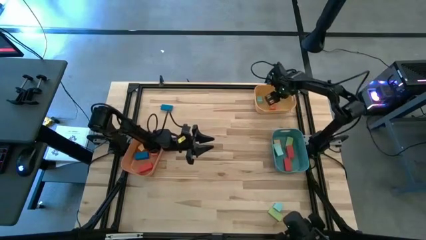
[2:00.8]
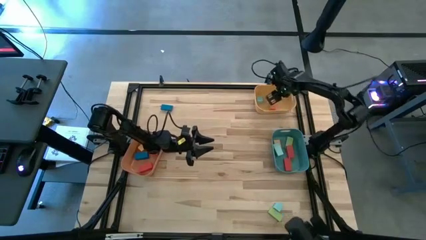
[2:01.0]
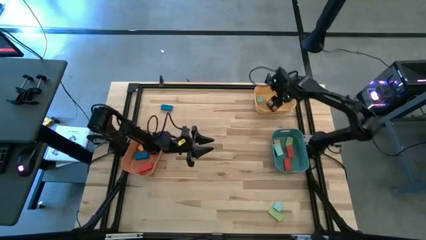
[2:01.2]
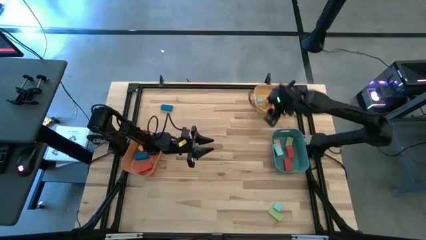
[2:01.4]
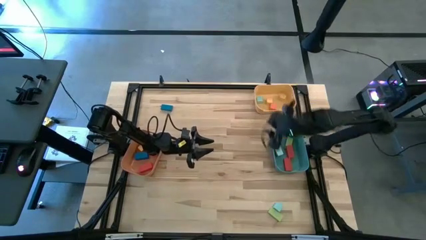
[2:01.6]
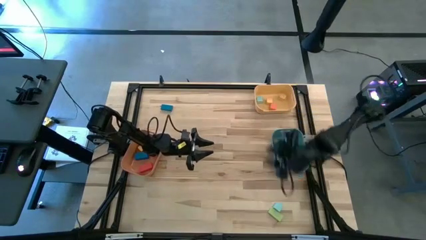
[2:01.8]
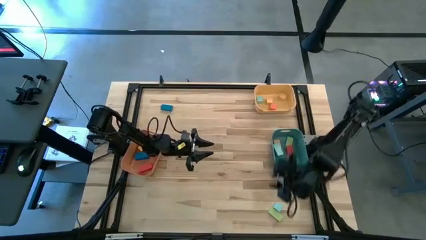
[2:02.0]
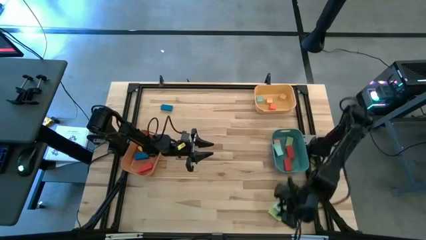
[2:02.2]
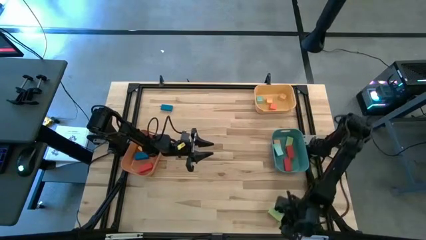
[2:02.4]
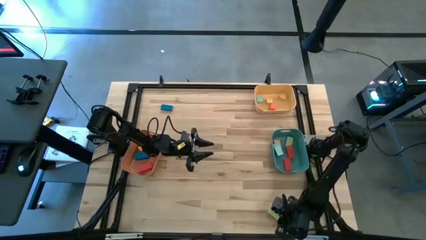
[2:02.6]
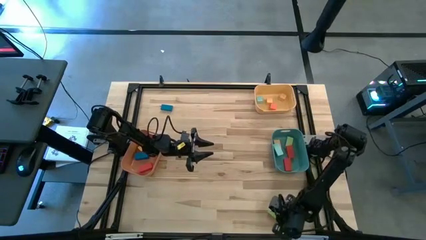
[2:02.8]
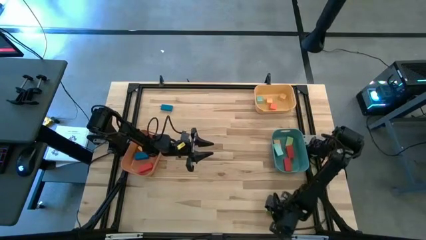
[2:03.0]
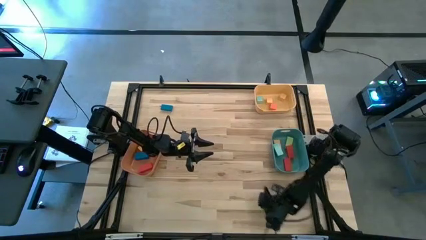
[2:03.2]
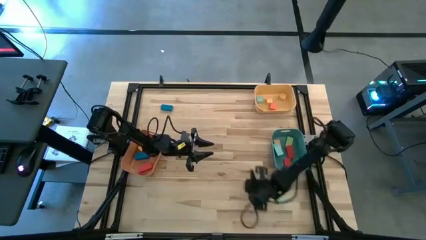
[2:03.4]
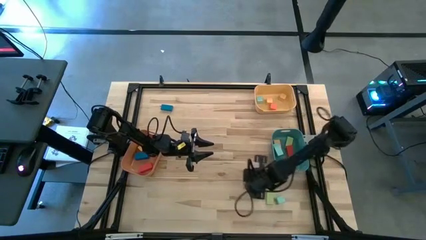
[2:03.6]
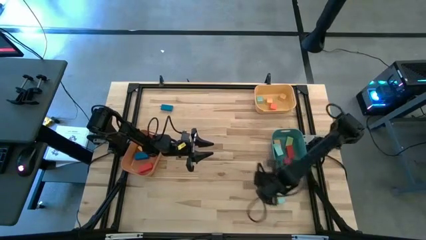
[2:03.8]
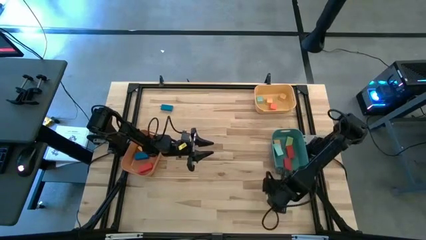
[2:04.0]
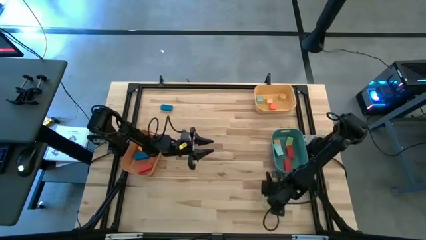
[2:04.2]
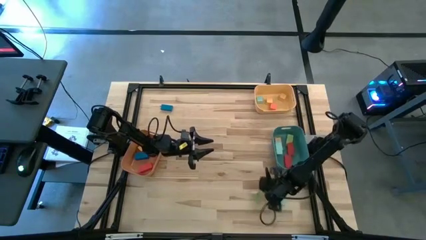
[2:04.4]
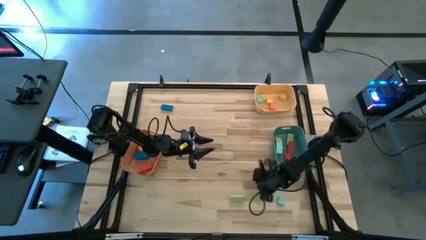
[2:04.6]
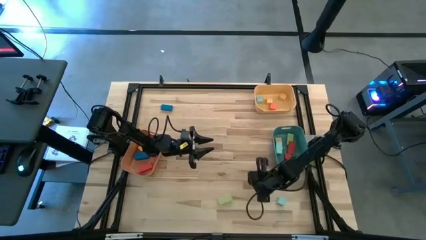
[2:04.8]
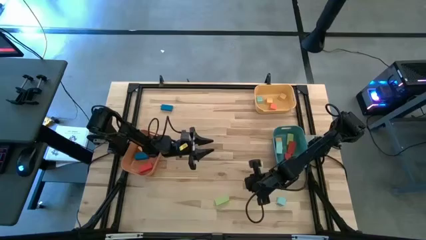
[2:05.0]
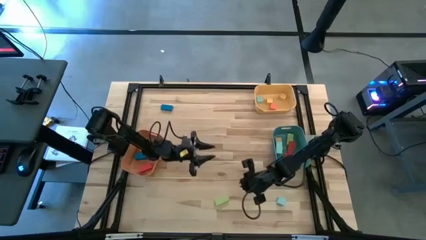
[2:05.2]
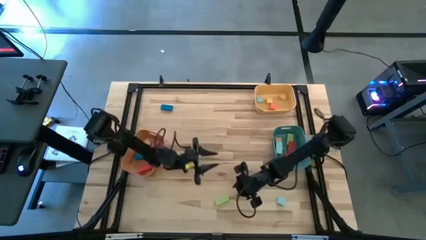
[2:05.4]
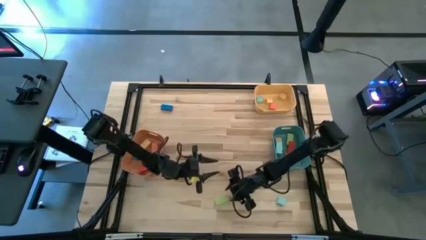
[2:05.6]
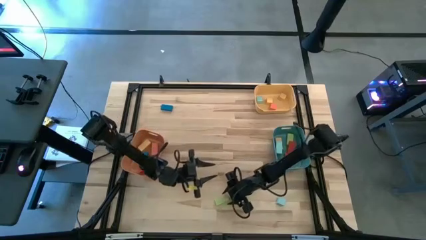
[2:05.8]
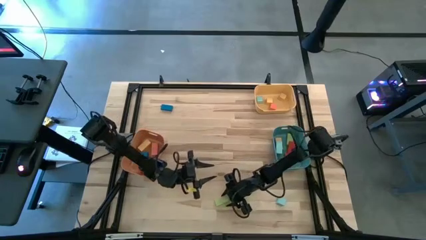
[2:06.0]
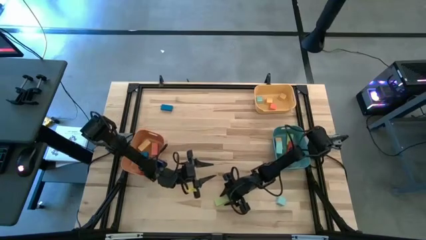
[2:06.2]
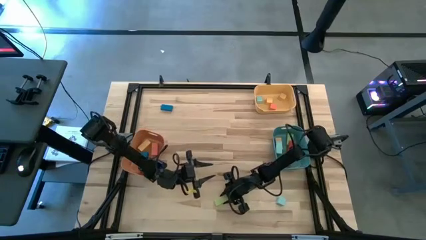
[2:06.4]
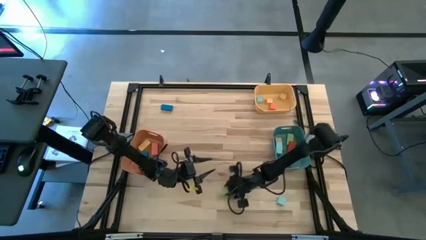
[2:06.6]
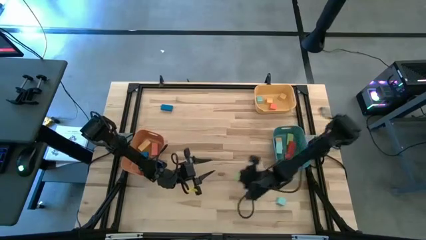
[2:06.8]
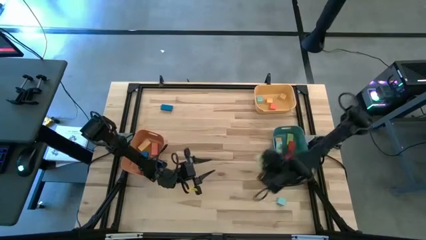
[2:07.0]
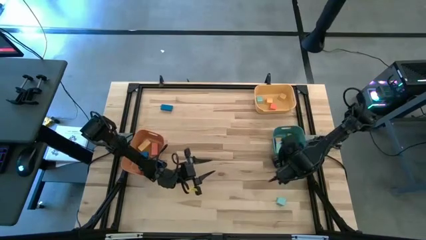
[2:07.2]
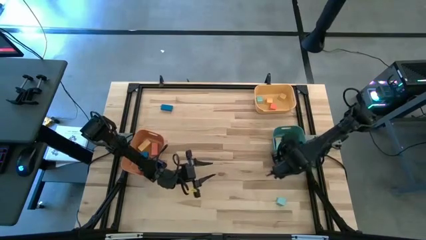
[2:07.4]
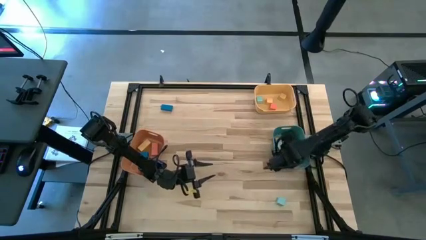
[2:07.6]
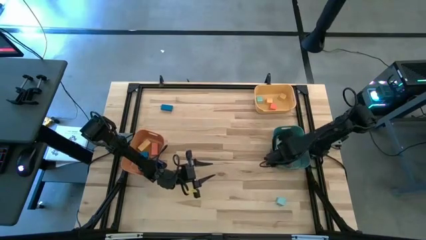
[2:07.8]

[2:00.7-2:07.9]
Task: Sort blocks by size
Put the thin green rectangular block into the green bin

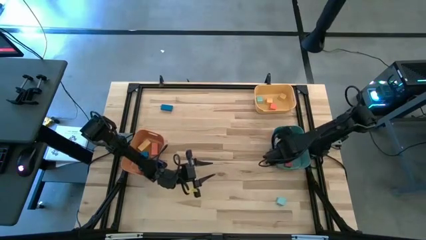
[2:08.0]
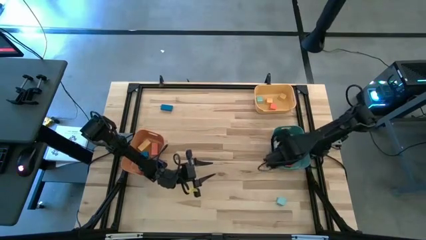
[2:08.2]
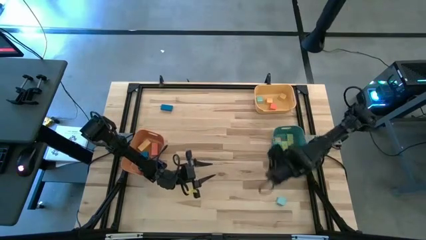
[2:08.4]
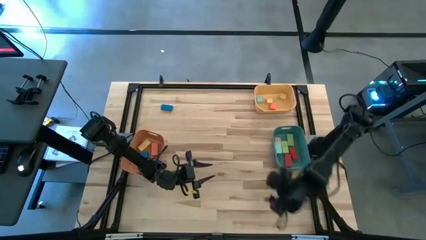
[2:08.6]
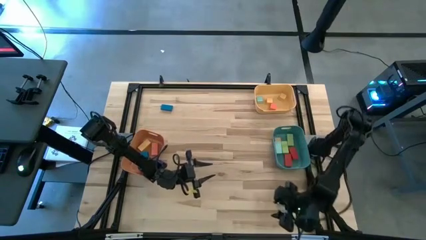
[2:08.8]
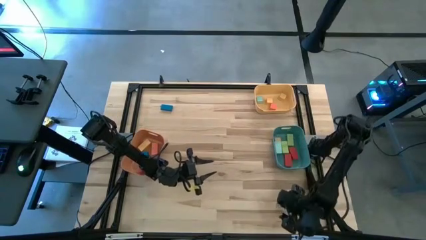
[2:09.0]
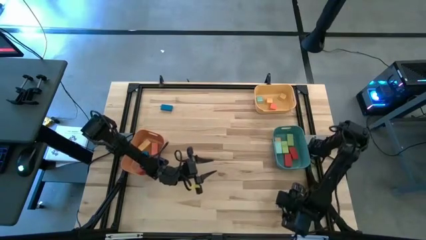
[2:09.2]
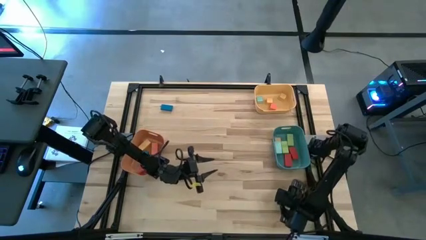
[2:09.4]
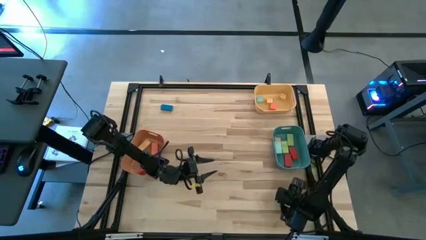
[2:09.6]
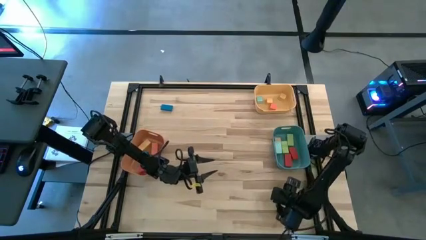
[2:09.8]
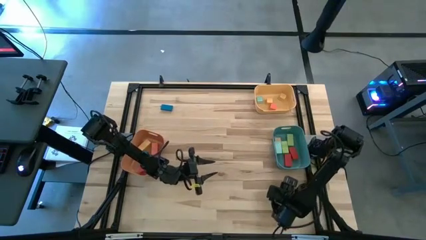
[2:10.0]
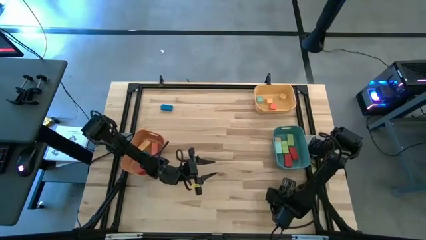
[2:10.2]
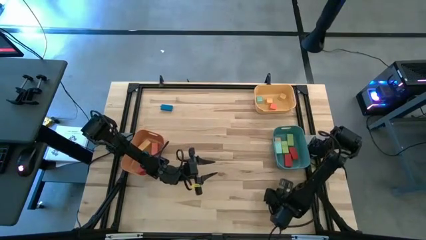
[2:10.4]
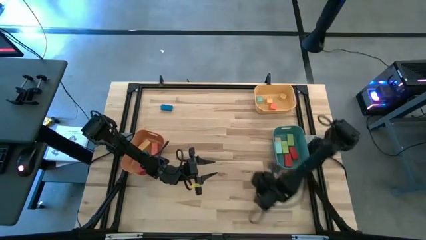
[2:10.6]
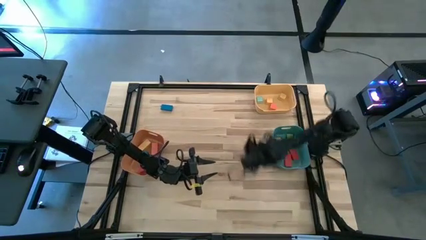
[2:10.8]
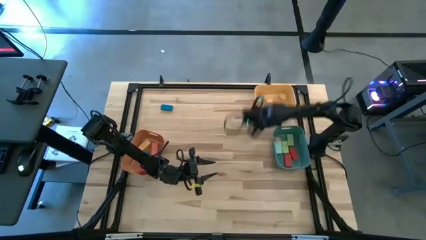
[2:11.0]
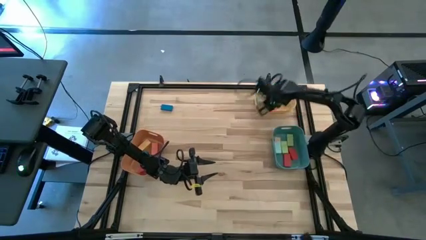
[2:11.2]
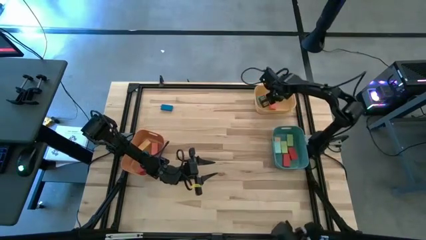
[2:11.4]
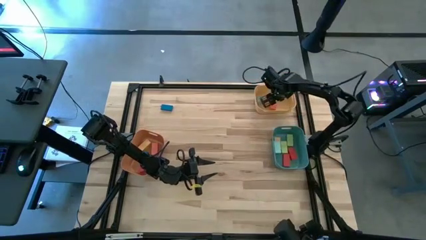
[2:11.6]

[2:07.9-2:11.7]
Put the light blue cube block into the yellow bin

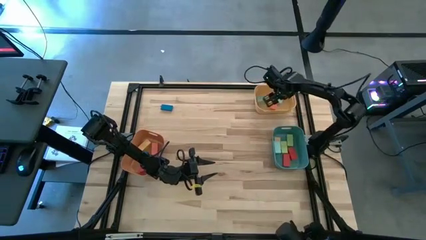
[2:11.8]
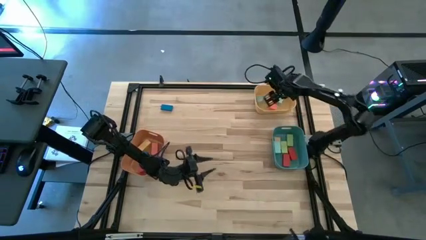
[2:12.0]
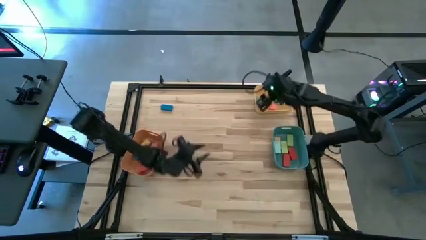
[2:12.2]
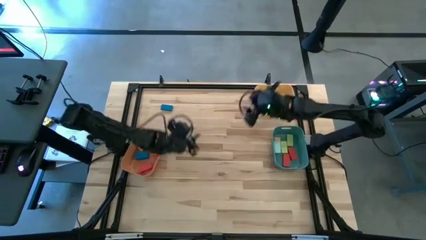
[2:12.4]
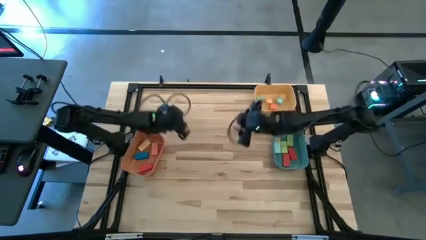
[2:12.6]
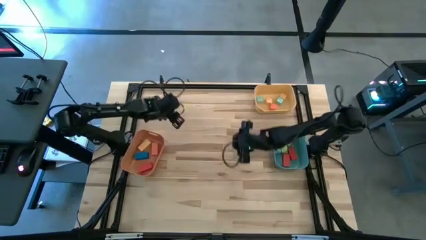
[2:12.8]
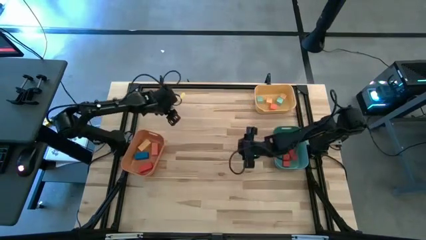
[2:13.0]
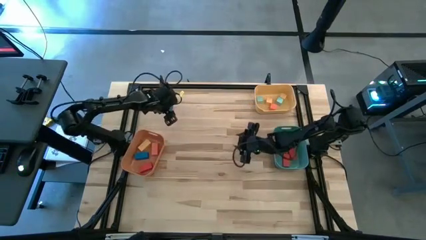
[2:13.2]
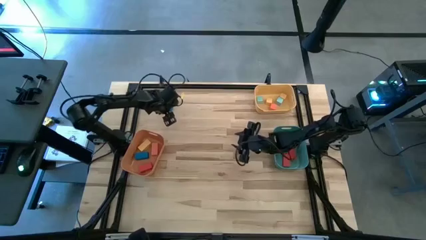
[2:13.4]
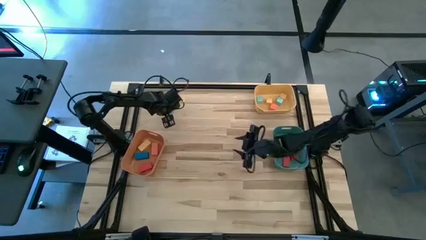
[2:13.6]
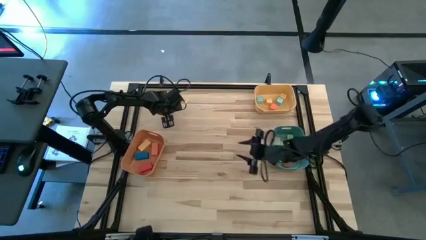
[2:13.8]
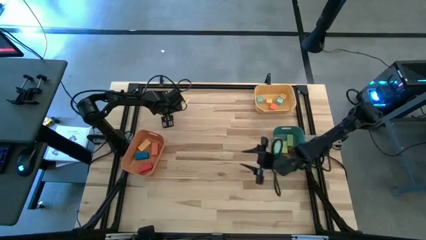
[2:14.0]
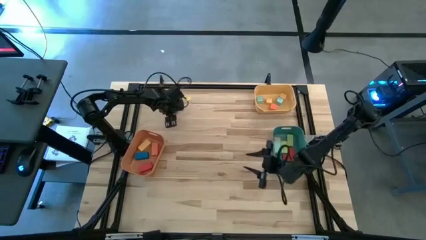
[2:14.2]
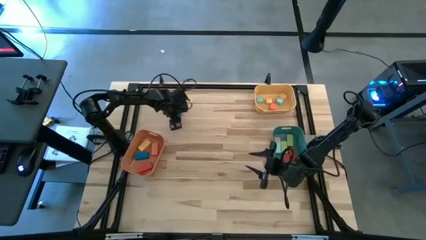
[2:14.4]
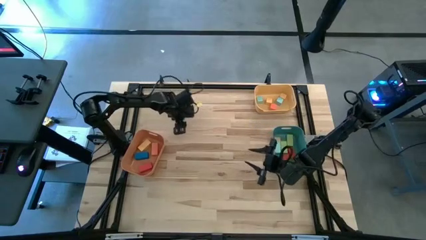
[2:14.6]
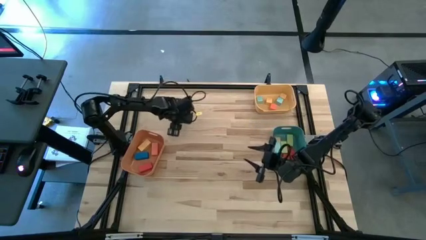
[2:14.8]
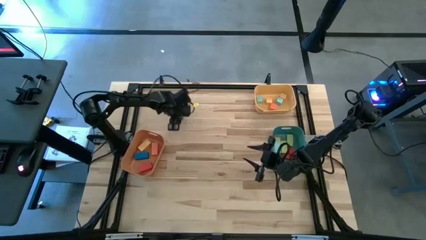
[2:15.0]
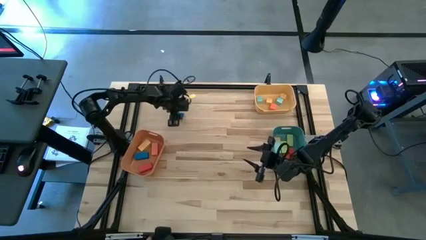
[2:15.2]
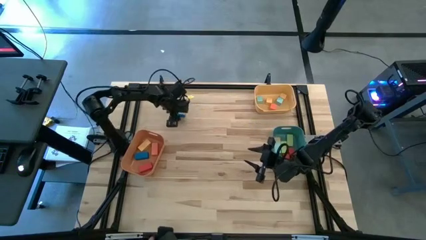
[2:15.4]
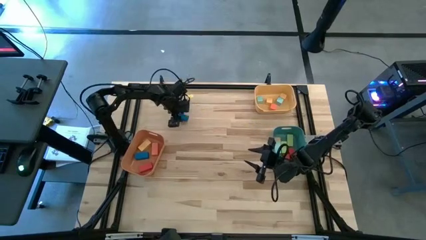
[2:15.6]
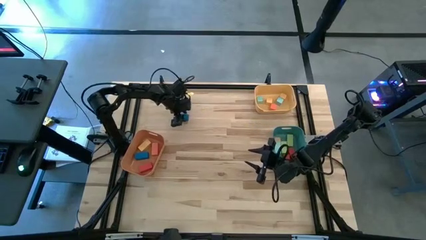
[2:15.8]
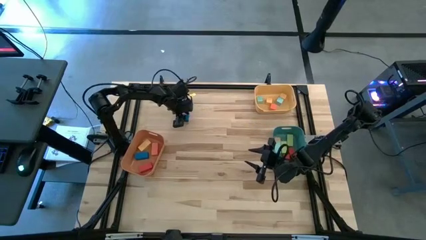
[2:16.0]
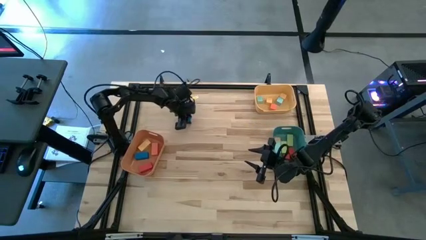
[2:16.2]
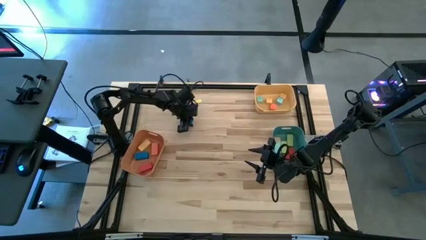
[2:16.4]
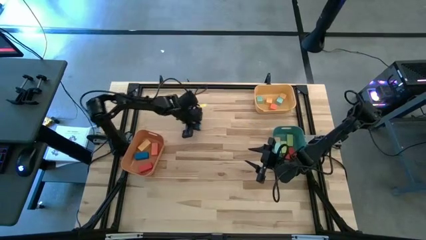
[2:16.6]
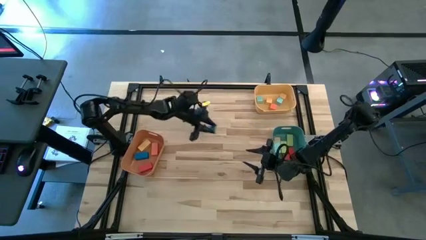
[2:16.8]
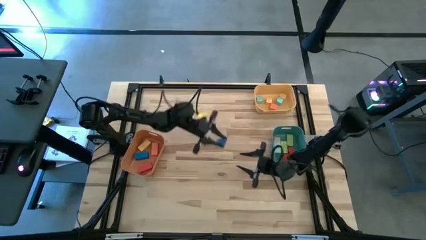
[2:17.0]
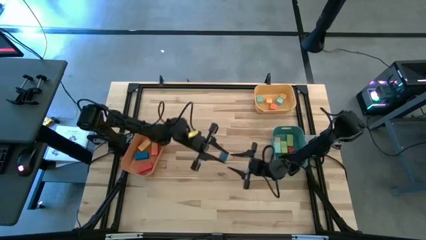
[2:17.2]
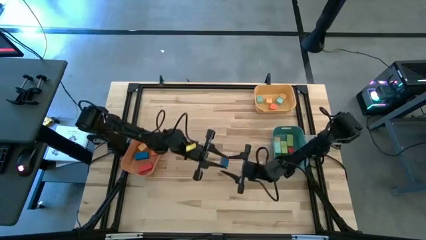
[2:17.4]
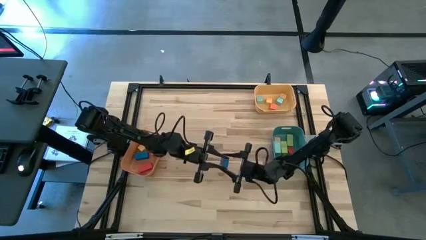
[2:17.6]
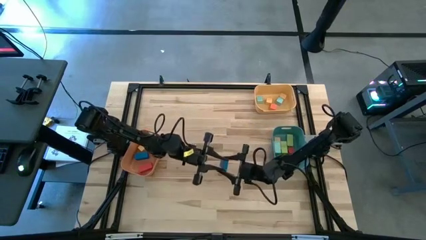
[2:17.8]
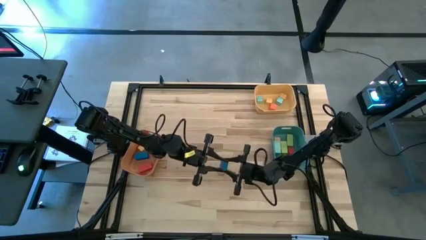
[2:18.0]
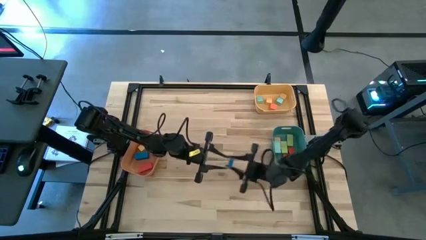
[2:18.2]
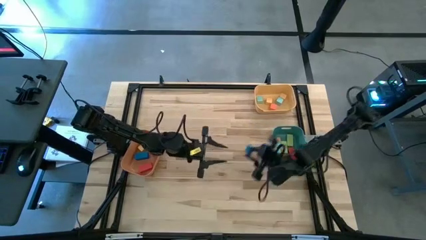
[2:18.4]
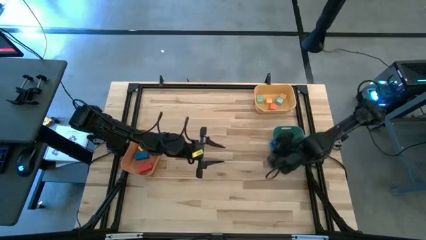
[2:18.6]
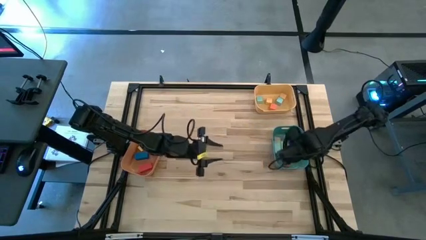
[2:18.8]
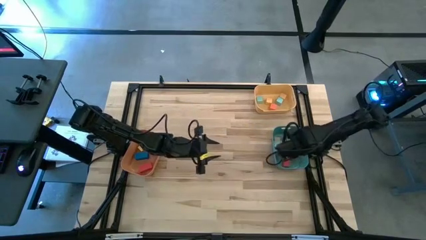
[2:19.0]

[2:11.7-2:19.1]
Put the thin blue rectangular block into the green bin
